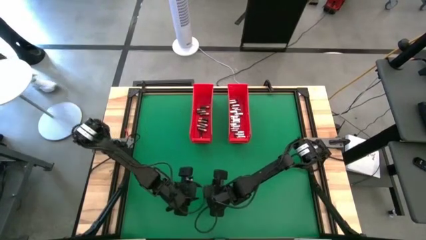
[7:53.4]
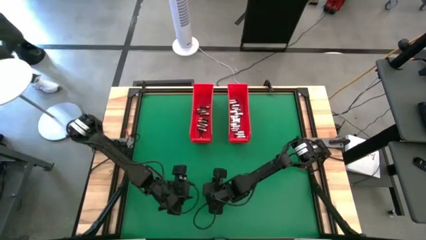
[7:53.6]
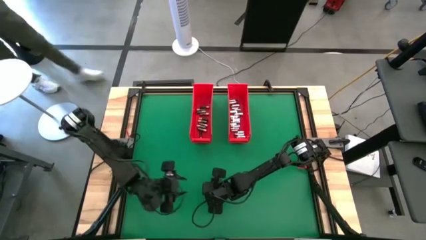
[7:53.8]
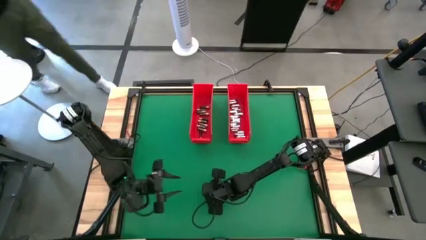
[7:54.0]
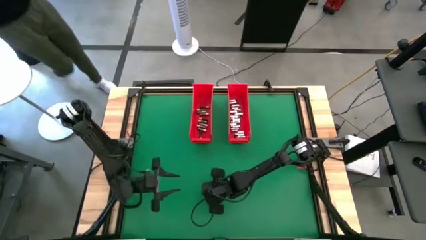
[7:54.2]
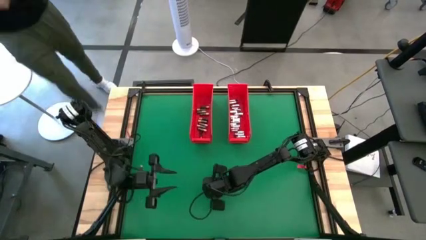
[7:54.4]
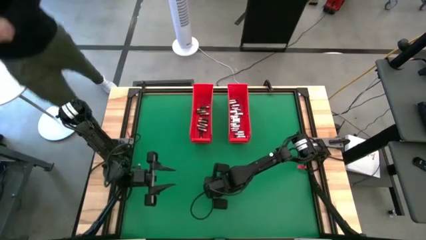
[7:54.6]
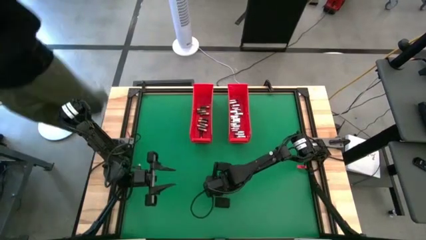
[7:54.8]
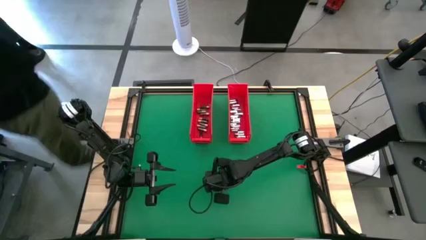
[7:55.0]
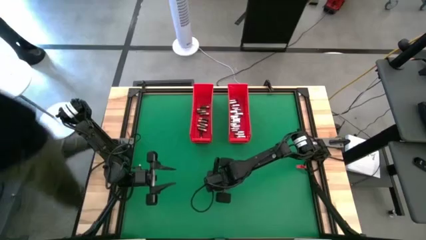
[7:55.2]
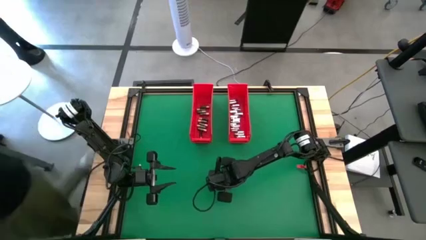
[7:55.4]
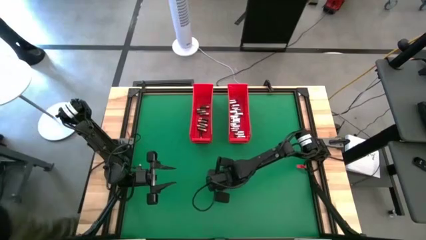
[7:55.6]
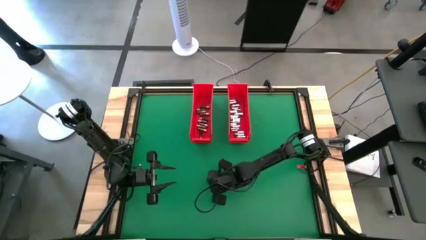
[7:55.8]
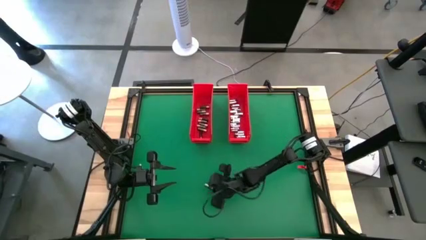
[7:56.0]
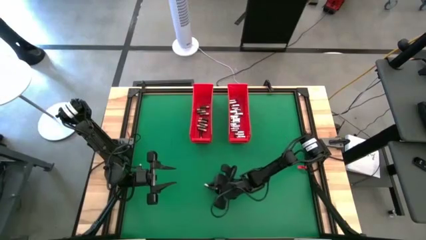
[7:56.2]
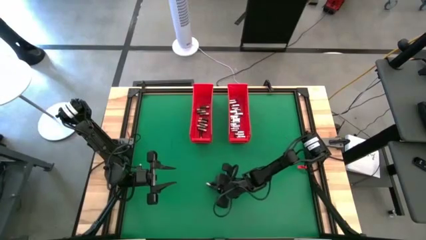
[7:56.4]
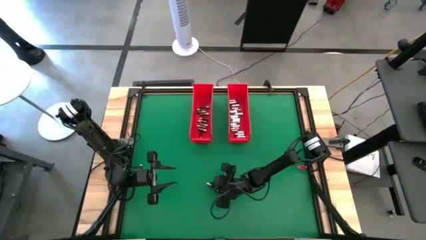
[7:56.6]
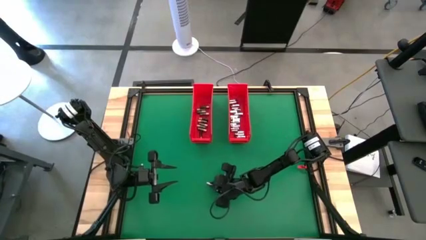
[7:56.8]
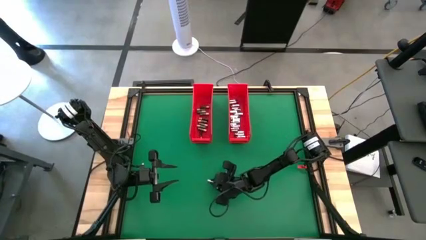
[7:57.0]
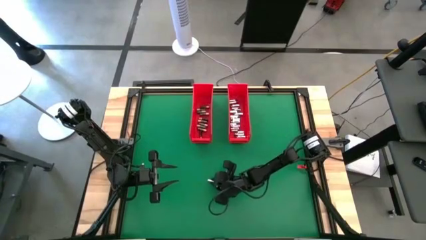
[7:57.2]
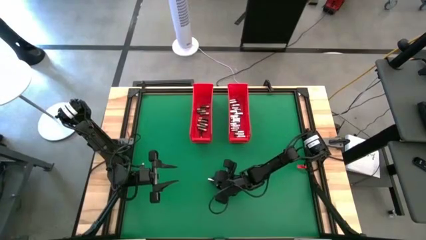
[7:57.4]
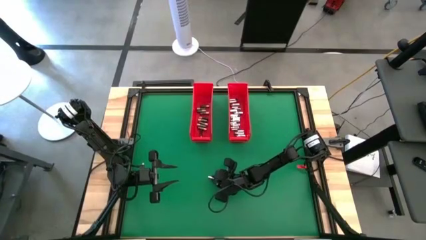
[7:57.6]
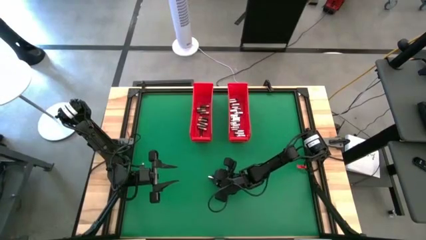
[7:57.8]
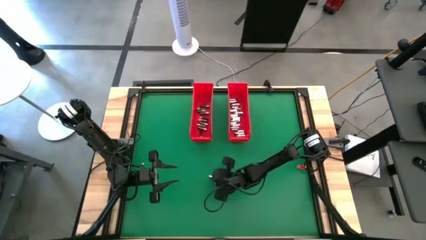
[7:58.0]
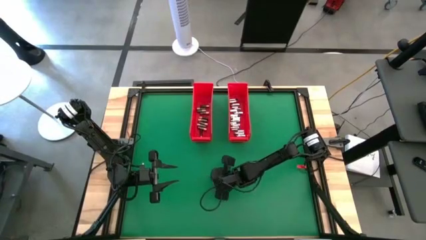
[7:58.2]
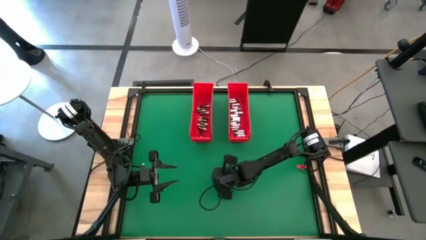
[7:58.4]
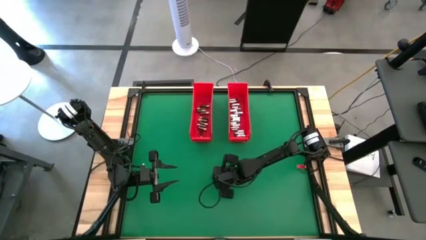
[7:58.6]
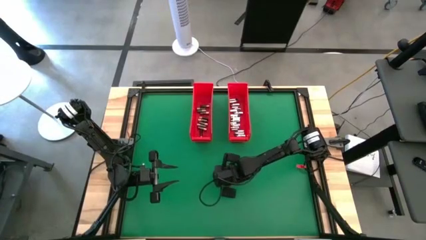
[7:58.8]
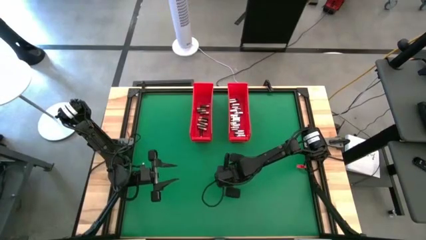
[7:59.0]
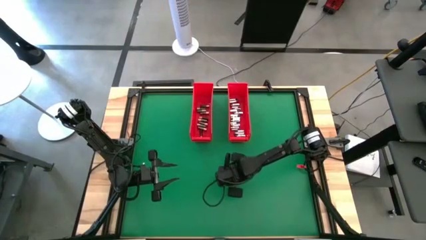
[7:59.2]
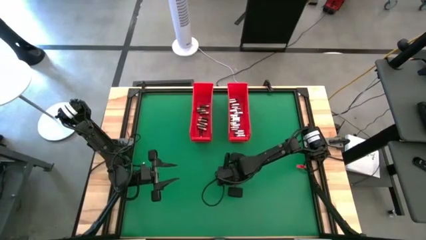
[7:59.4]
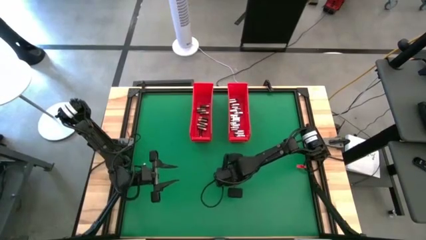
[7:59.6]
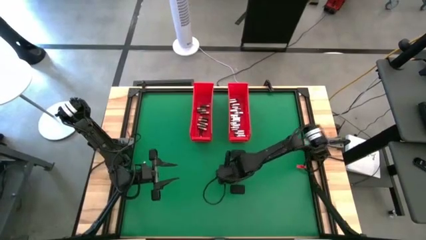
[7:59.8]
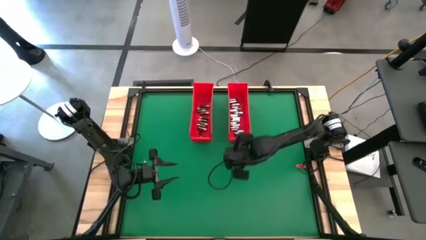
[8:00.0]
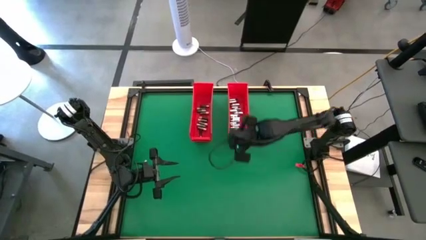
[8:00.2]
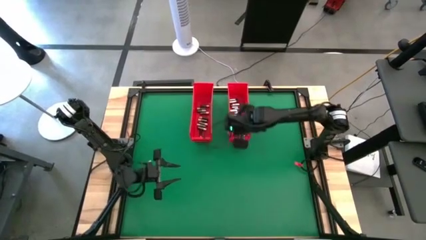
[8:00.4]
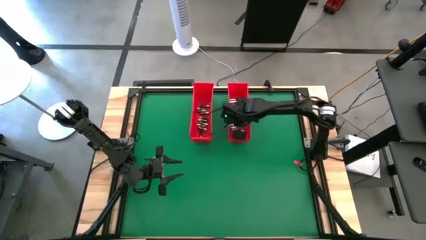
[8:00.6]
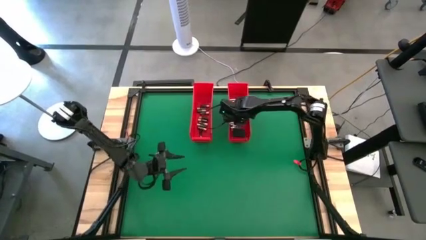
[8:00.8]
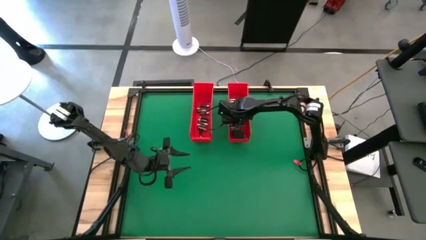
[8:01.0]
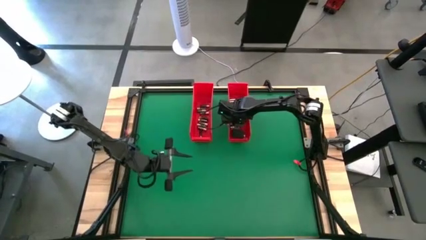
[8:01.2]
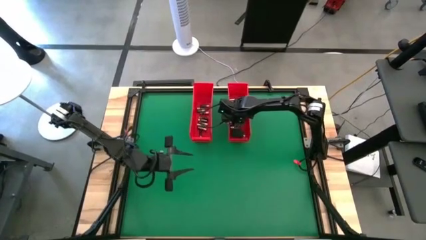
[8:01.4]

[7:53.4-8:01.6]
Task: Sort batteries
Put the silver battery into the right red bin

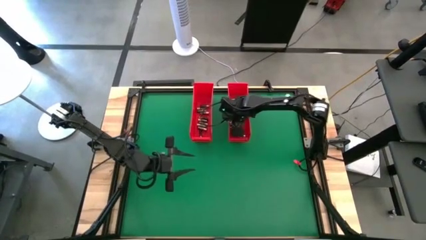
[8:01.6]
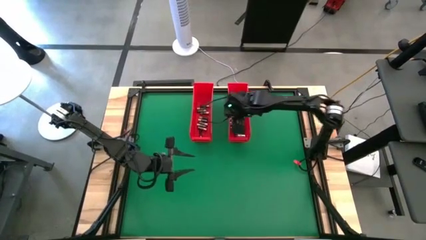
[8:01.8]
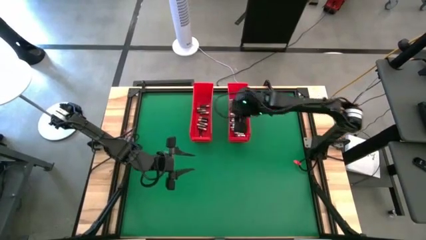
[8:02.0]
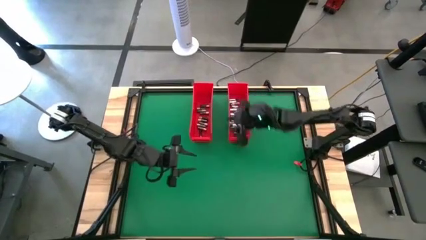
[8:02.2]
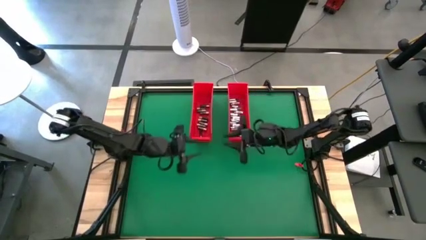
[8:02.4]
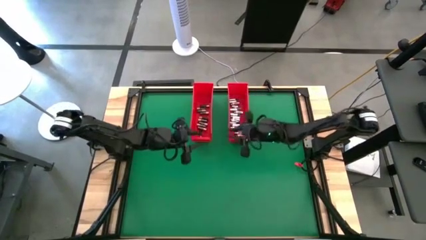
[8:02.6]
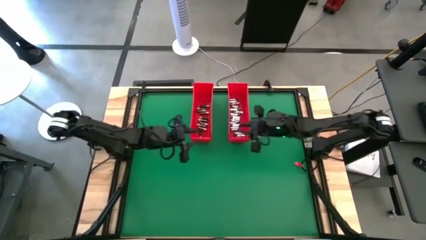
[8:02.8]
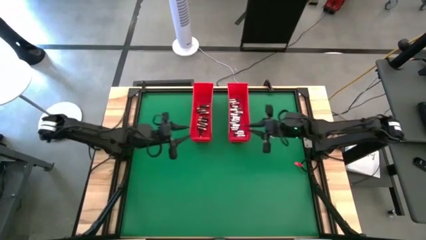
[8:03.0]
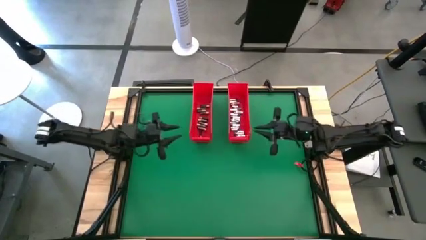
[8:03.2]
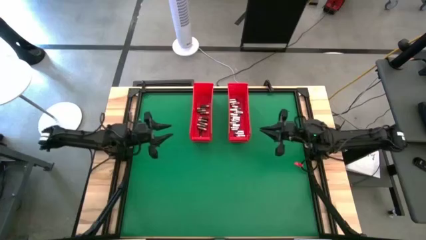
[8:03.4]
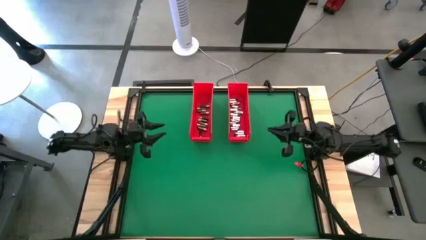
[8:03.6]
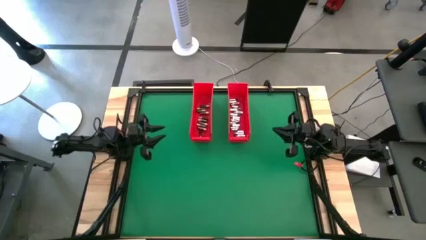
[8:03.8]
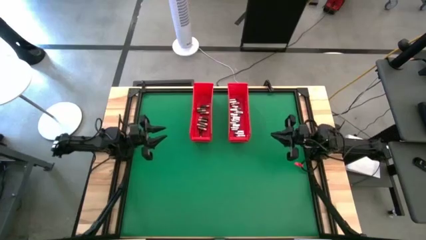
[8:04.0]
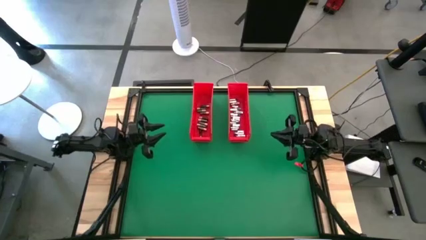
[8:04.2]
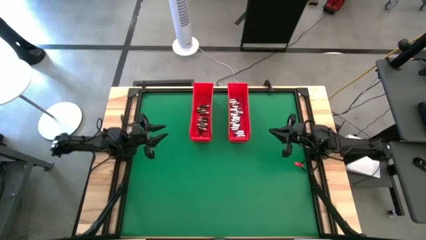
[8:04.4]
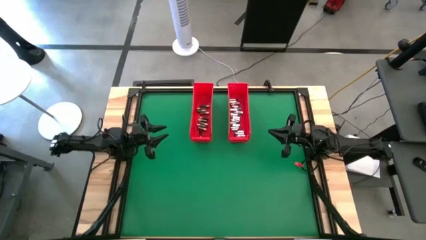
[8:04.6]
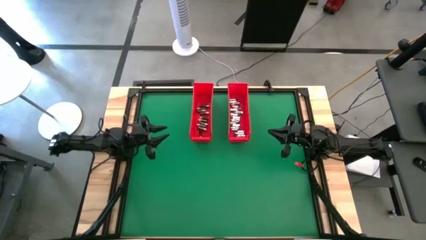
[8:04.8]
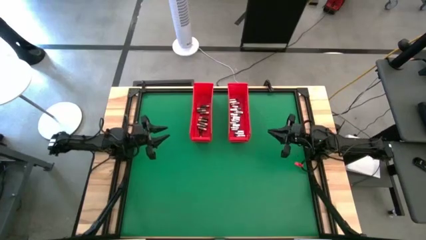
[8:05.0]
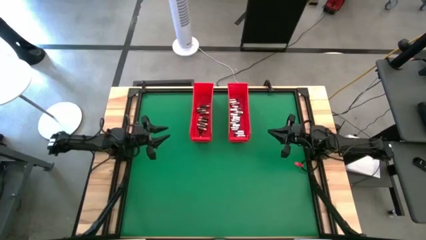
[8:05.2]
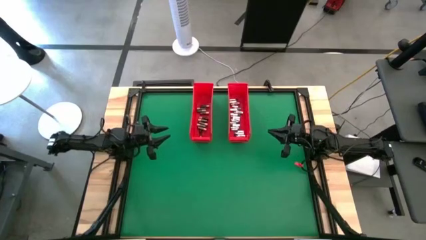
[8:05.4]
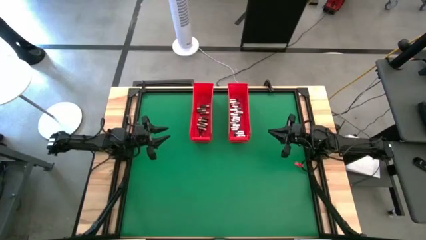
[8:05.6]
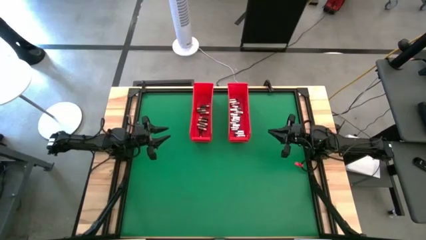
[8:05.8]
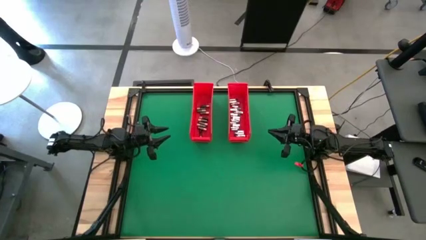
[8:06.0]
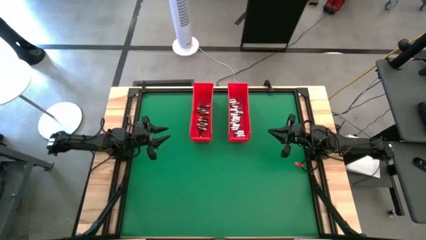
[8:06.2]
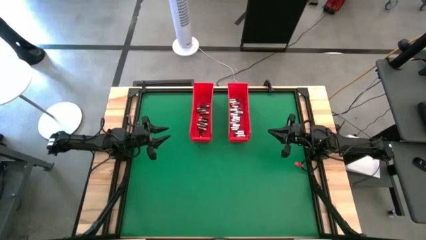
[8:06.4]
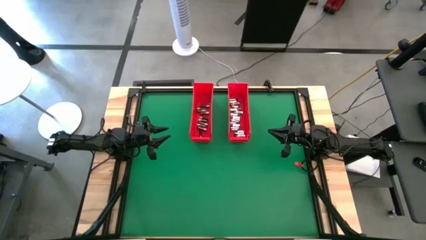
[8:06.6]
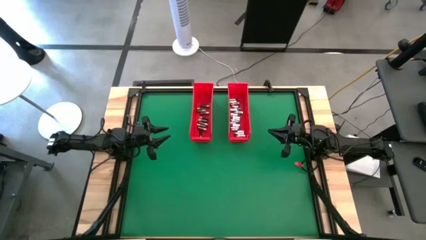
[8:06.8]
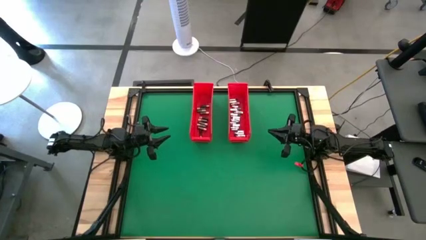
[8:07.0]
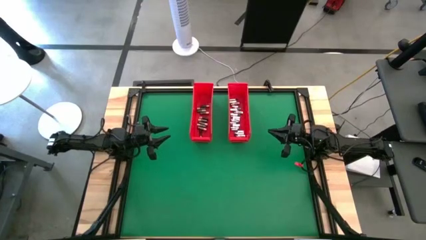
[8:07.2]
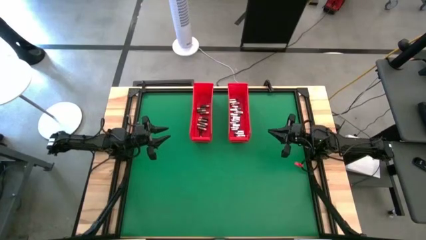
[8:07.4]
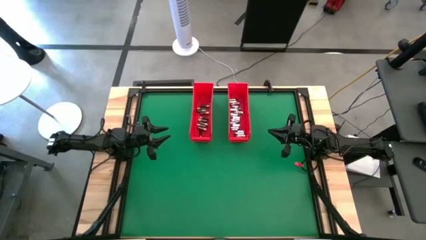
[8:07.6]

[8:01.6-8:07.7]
Return to Home Position

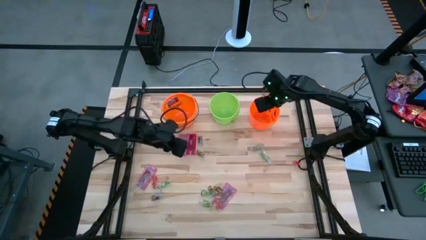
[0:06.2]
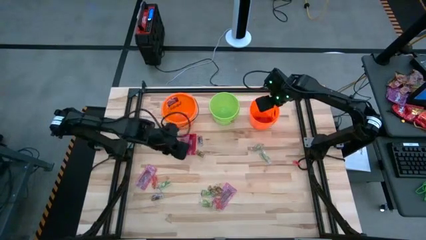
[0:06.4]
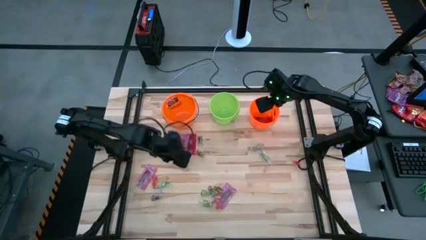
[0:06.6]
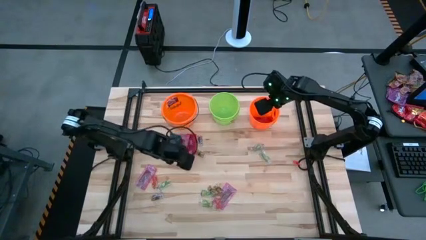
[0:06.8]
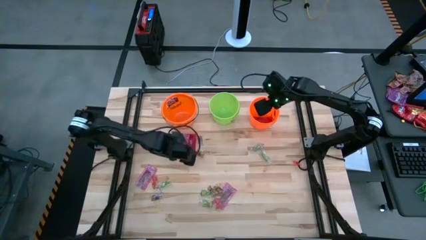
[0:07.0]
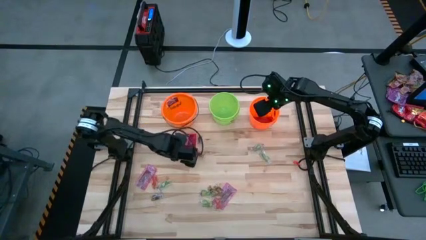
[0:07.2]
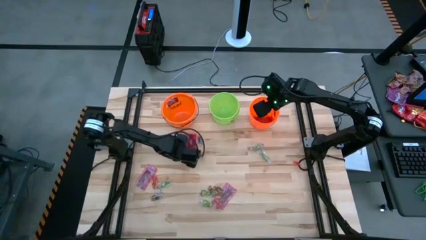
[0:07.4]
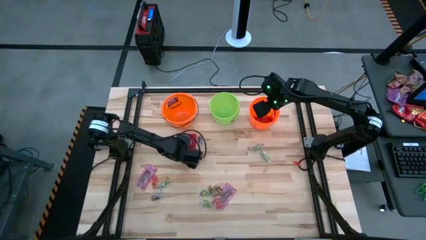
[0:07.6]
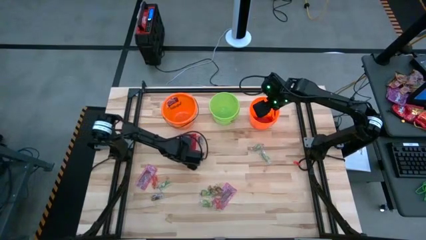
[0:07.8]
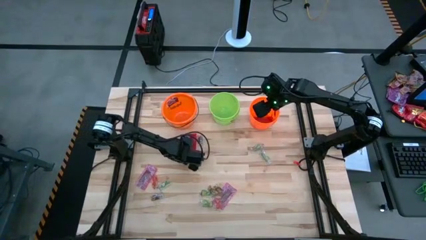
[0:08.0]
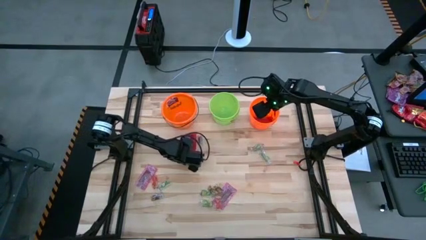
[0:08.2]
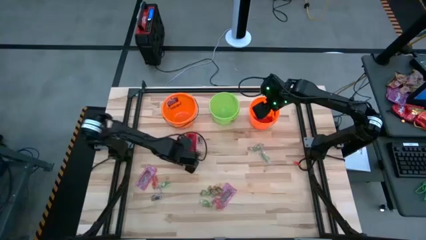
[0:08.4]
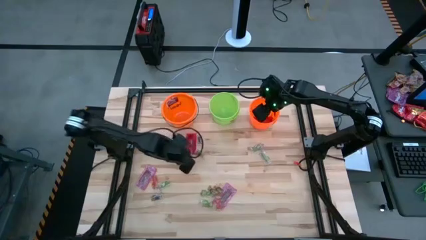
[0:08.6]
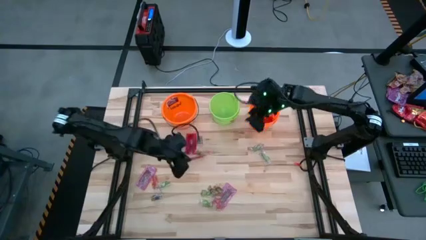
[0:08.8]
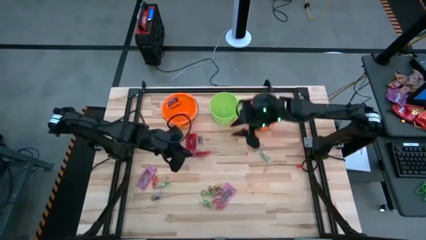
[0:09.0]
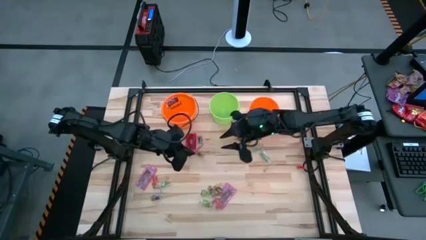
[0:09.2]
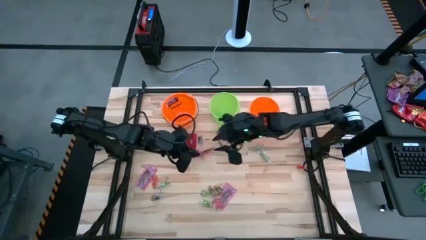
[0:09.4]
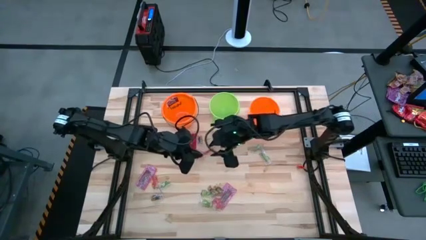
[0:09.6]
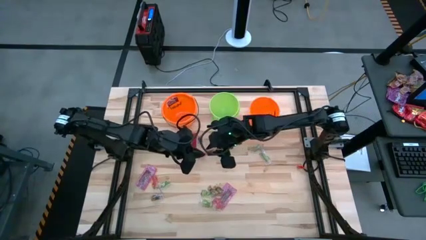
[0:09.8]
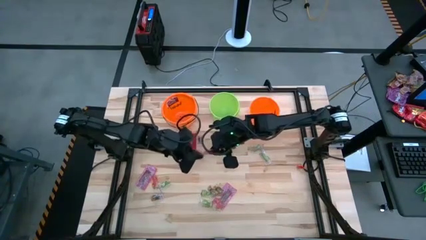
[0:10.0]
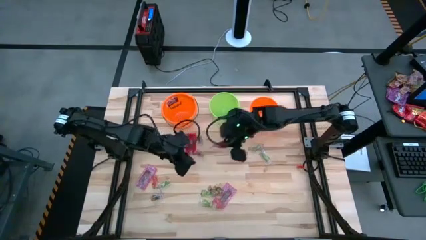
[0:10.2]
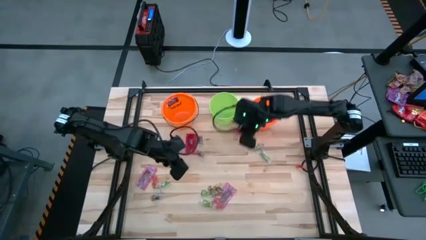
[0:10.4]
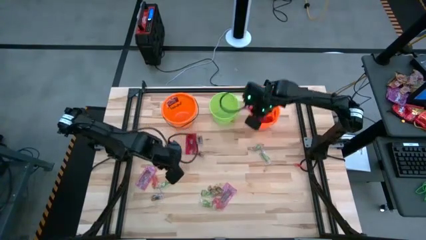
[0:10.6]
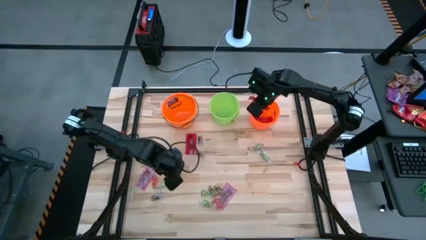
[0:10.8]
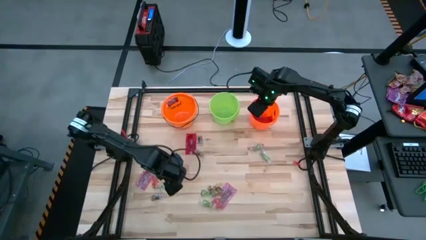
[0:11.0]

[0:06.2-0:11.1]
Task: Sort candy by brand, put in halloween buckets
Put the red candy into the left orange bucket
